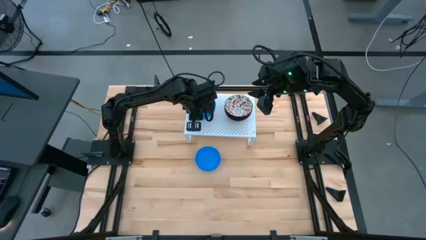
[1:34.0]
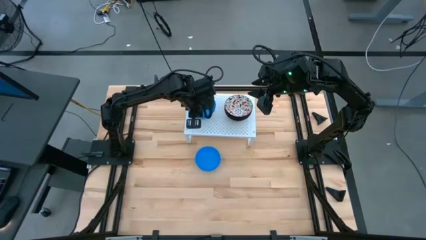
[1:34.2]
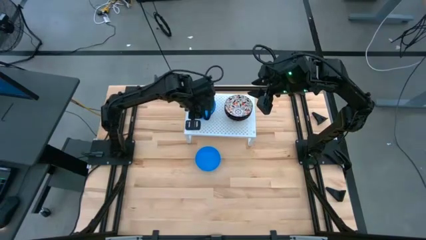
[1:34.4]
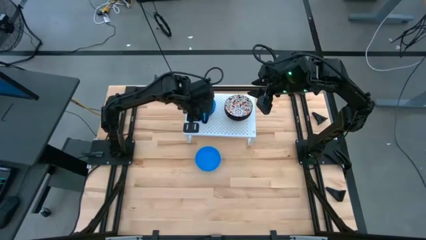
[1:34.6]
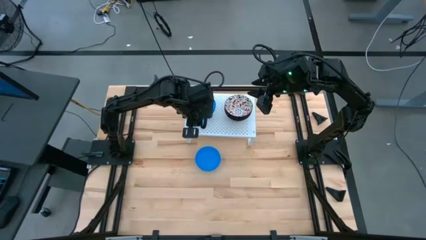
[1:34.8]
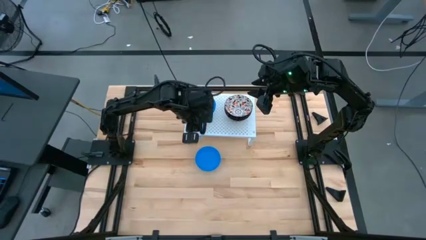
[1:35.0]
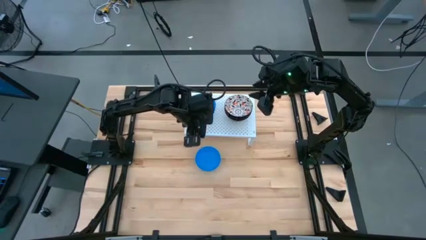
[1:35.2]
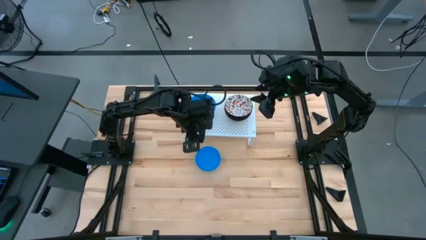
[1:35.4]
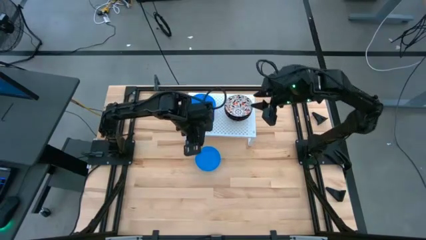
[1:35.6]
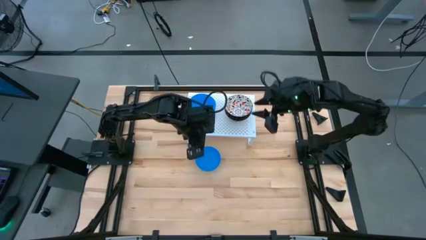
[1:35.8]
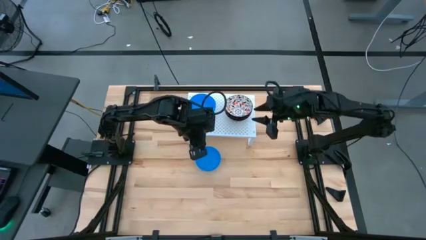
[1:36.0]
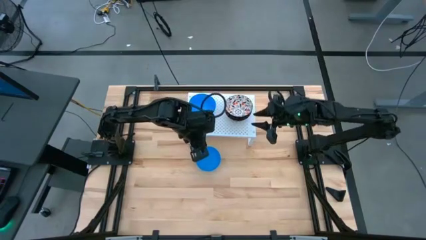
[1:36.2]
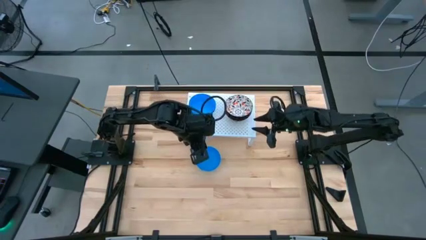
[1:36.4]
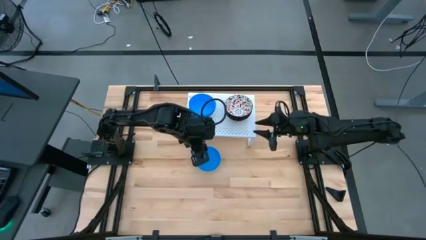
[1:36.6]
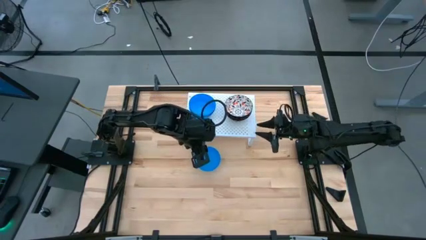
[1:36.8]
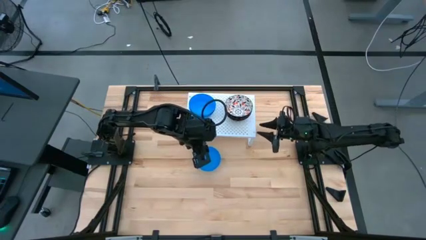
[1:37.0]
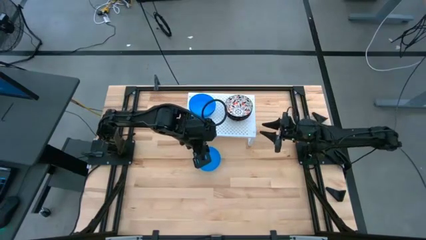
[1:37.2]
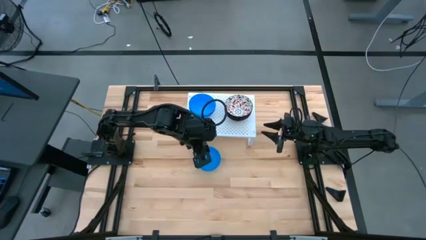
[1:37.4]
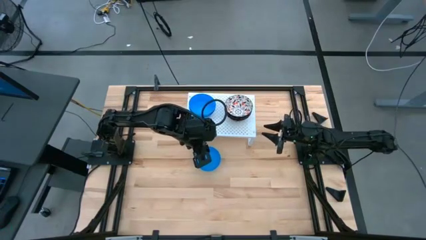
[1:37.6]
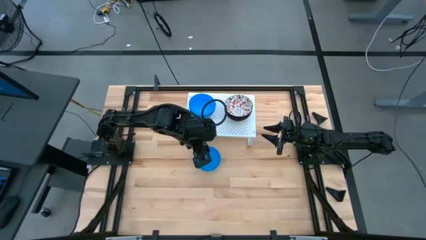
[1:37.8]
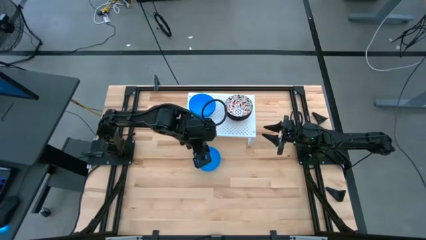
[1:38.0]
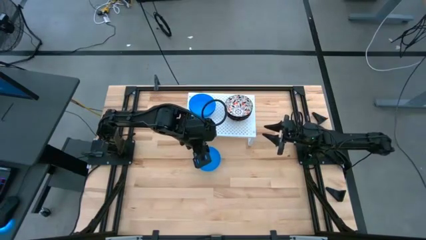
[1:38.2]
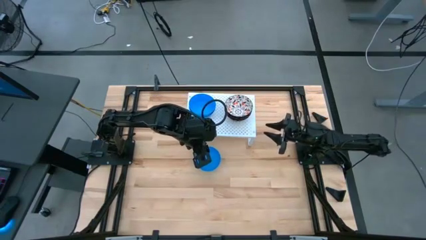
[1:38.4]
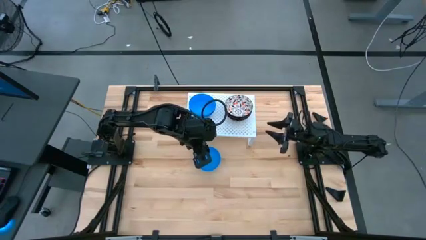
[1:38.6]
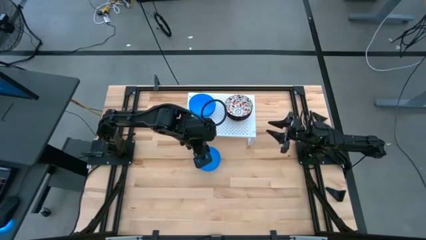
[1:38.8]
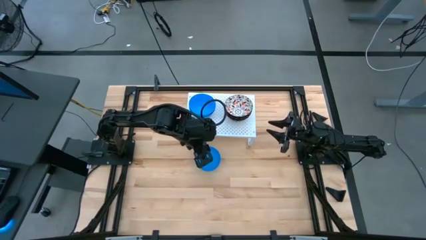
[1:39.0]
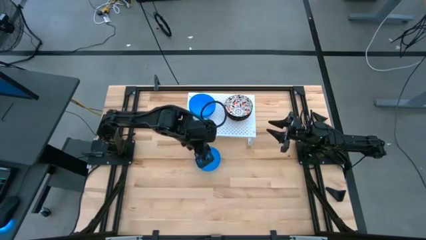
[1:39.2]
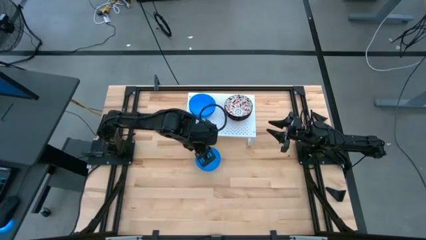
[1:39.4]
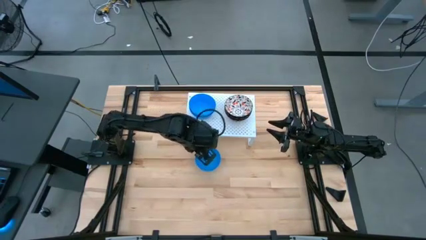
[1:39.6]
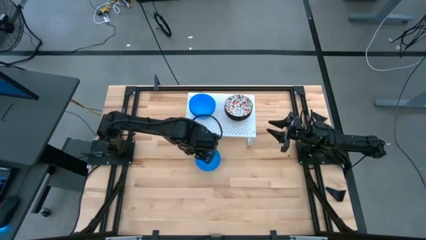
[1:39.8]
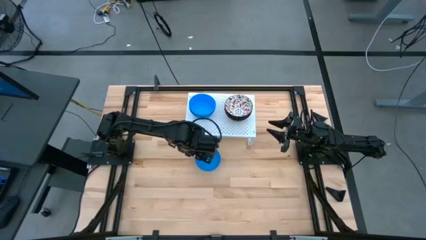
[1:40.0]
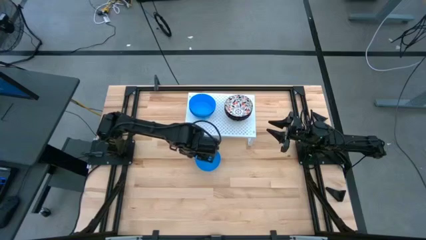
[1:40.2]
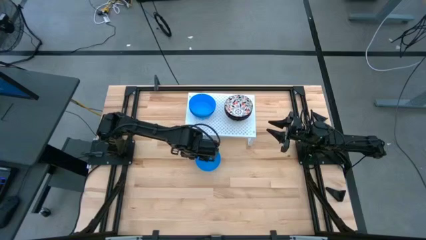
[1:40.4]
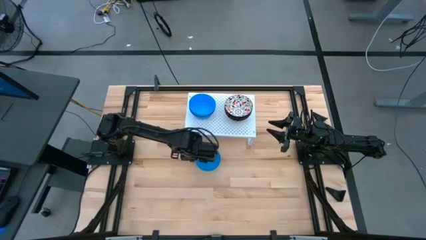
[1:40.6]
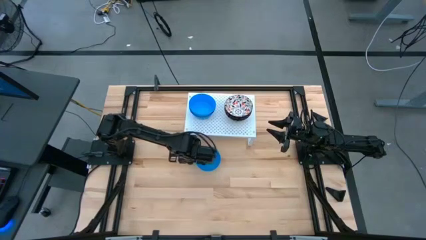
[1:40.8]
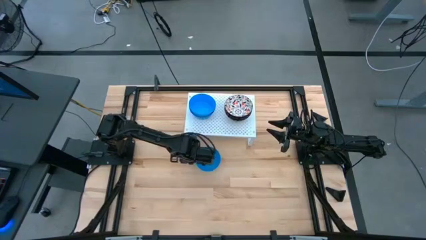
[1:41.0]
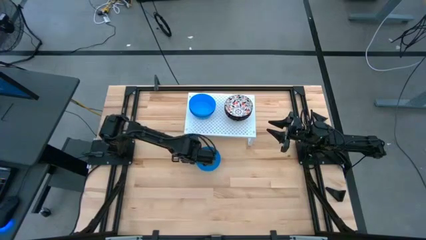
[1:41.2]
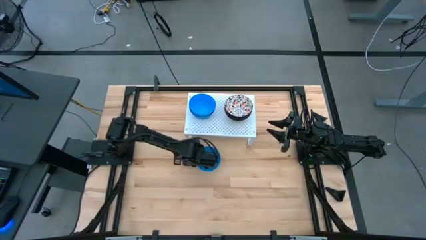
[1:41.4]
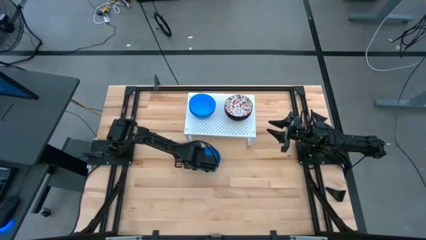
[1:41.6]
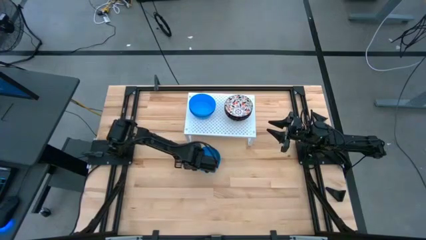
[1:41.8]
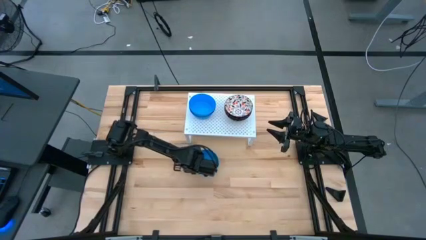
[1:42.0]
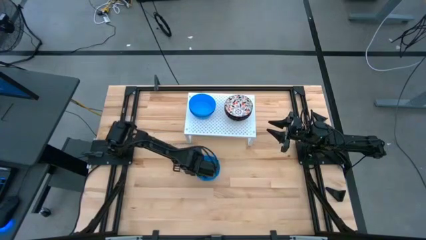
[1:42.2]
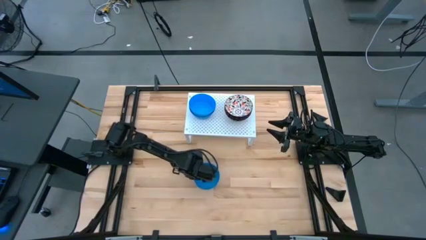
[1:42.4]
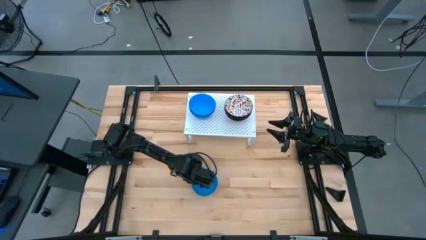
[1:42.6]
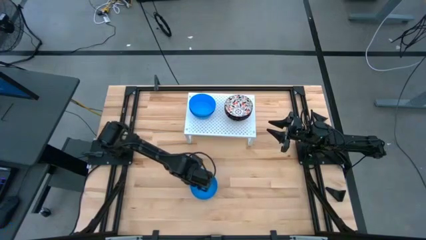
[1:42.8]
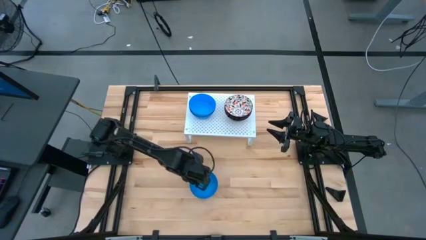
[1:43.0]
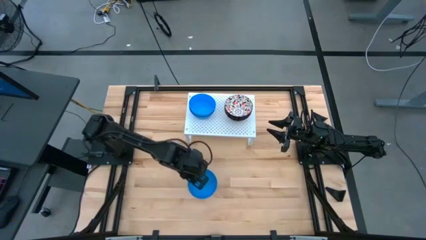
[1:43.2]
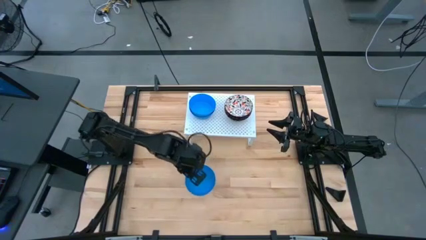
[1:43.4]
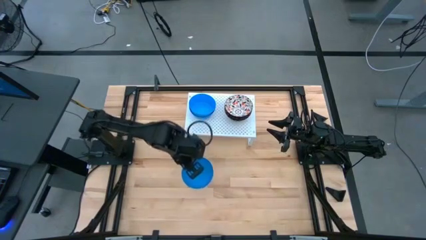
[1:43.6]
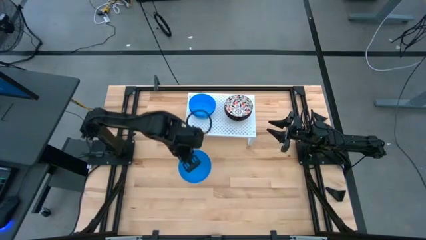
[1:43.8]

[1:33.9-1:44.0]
Task: Pick & Place Mini bowls
Stack the blue bowl on top of the other blue bowl on the shelf

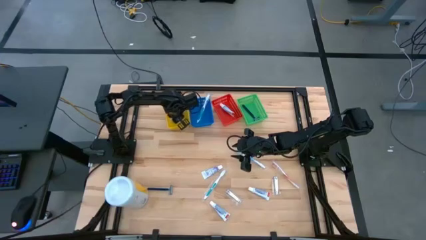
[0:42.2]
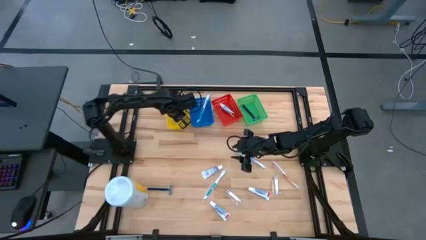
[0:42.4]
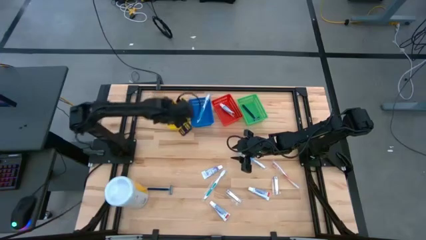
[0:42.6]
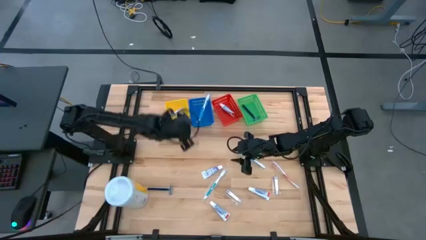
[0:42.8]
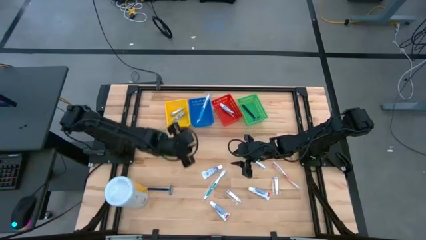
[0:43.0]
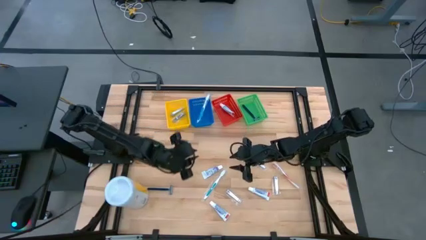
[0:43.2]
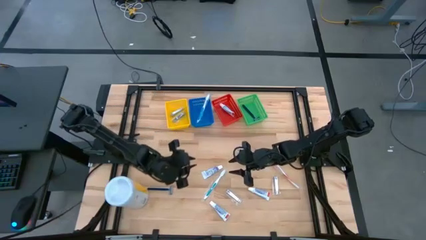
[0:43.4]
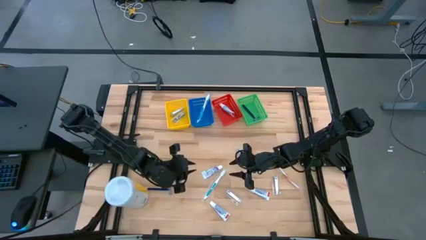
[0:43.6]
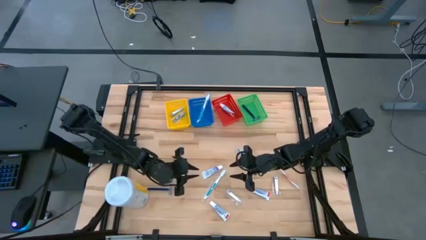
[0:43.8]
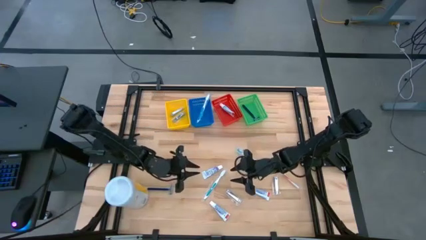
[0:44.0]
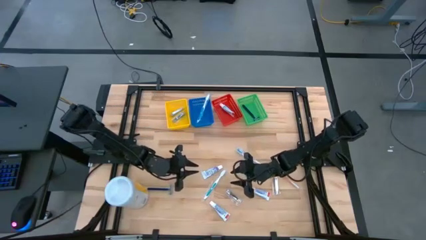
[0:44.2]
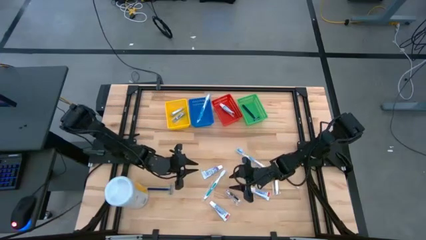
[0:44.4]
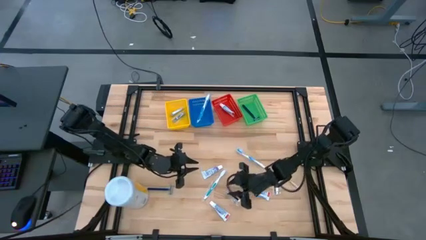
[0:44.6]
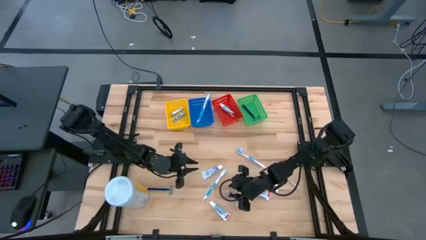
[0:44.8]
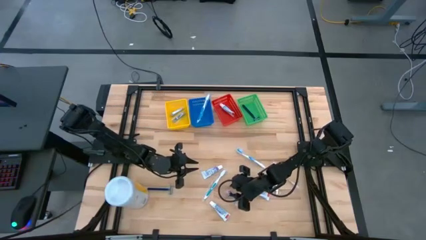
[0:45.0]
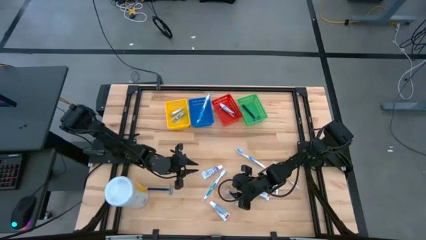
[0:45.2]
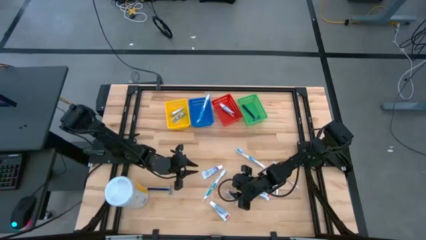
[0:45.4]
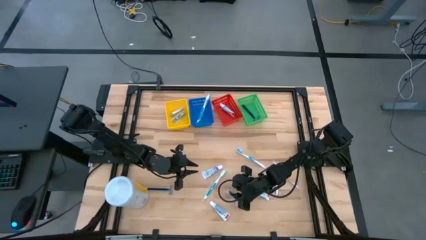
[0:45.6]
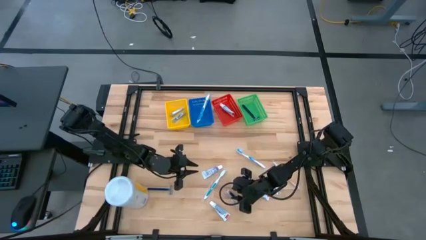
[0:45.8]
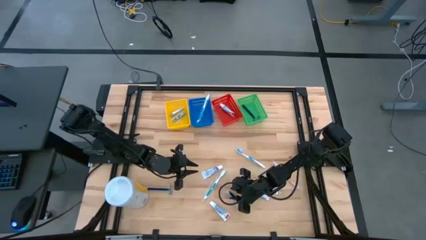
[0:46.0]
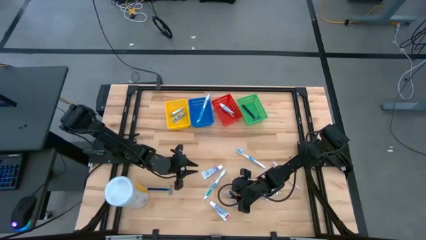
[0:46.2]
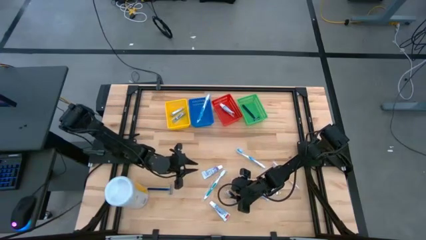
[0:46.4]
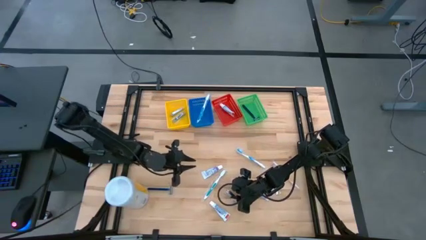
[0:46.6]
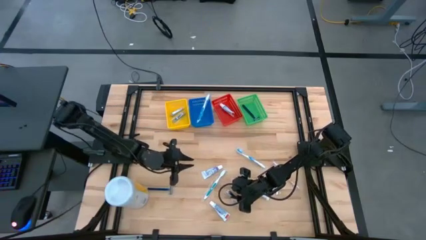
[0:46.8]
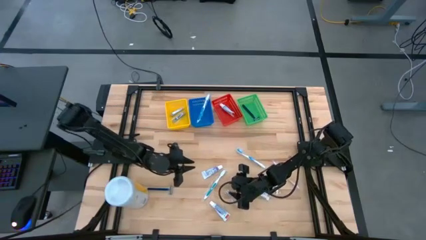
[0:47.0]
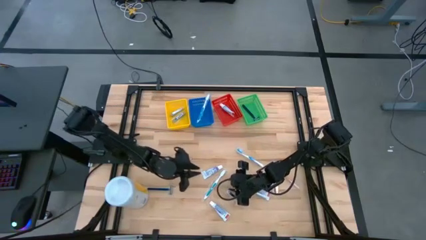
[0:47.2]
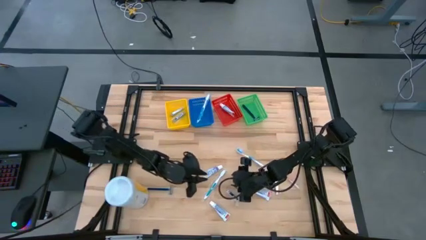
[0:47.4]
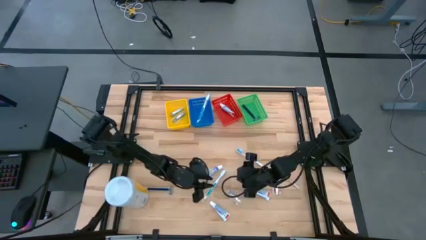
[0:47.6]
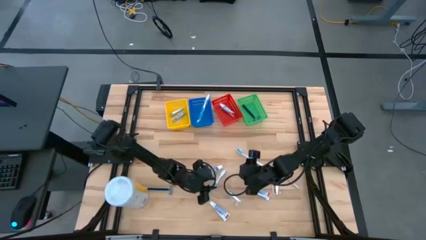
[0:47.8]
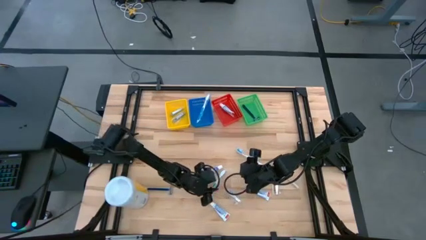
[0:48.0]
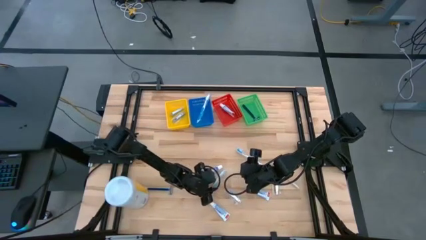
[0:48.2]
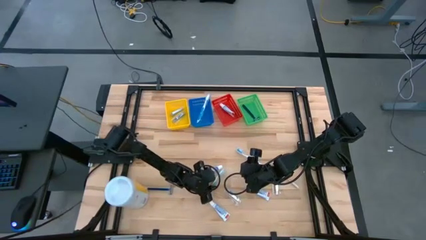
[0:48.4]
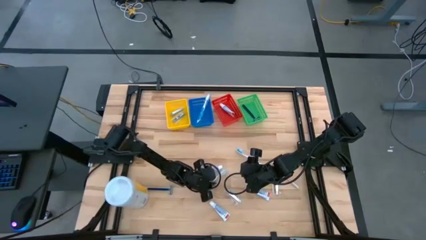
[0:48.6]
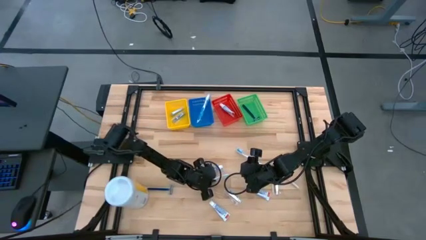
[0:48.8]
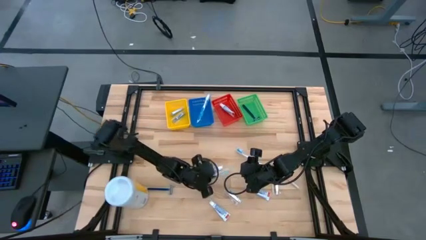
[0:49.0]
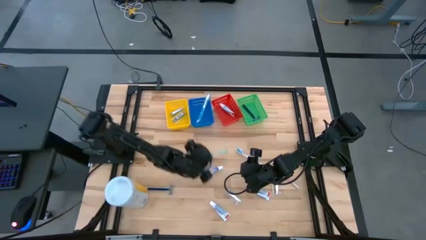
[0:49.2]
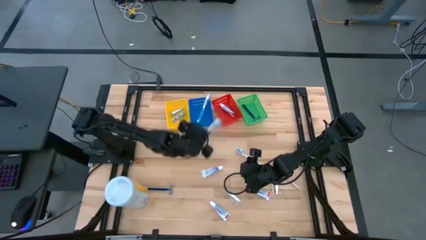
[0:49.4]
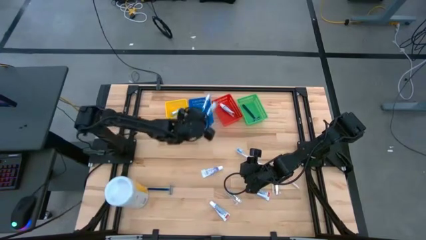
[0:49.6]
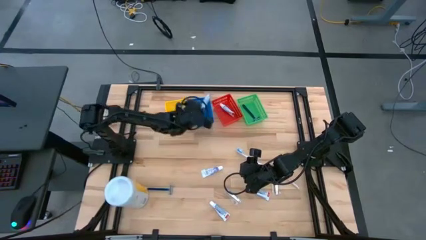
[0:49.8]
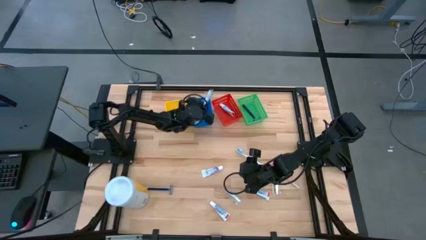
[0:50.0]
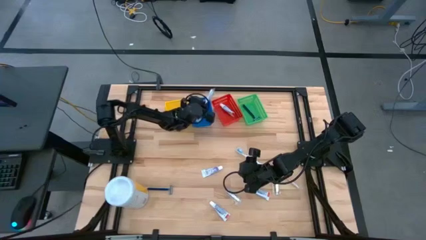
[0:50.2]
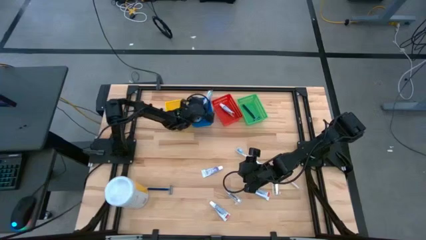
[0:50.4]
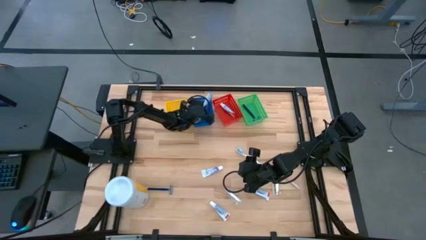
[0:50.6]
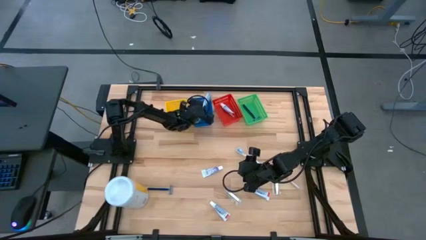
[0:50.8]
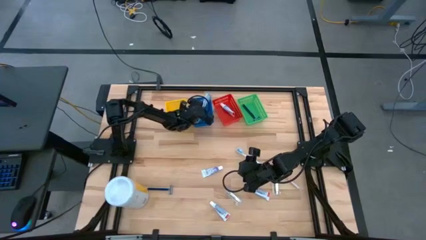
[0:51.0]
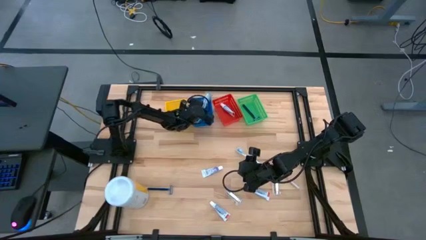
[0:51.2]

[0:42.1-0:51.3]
Task: Pick & Place Travel size toiletries
Put the left blue toothbrush into the blue bin
